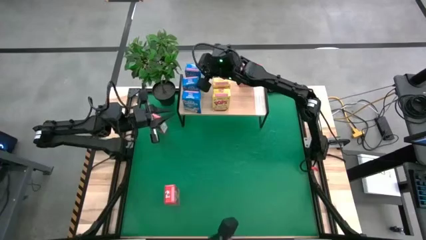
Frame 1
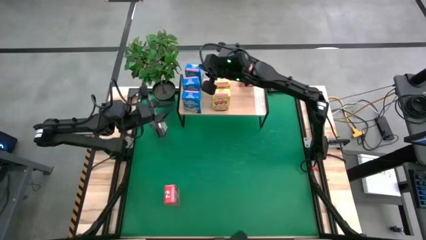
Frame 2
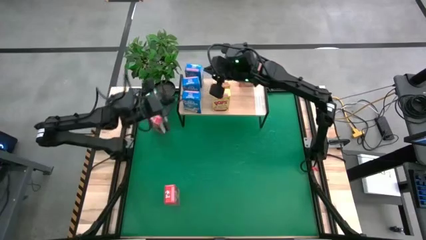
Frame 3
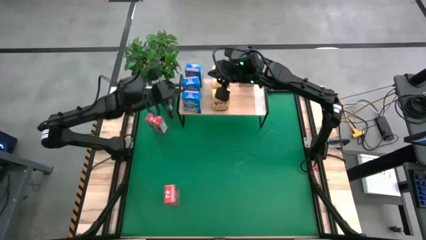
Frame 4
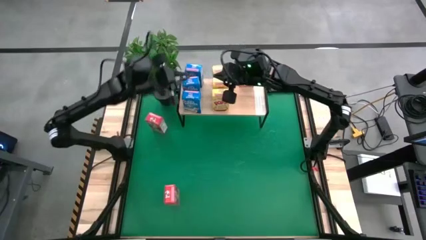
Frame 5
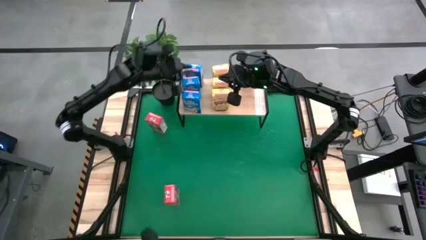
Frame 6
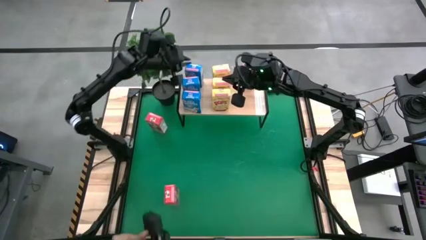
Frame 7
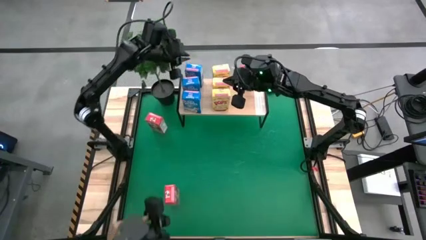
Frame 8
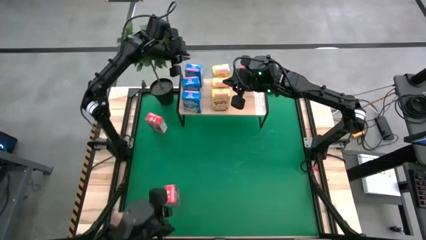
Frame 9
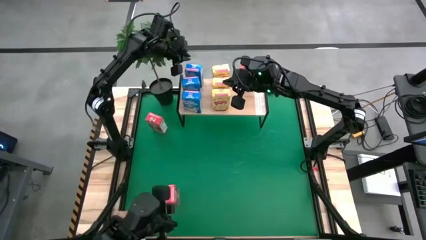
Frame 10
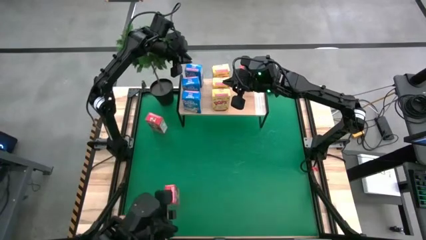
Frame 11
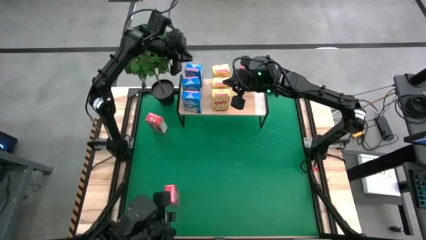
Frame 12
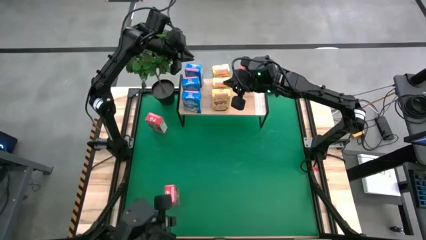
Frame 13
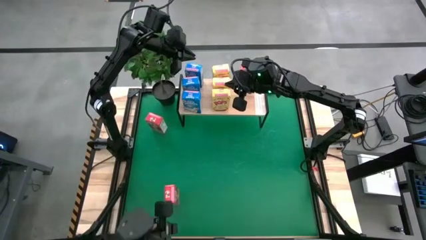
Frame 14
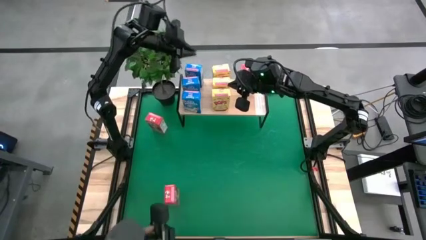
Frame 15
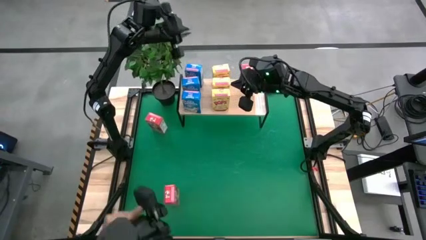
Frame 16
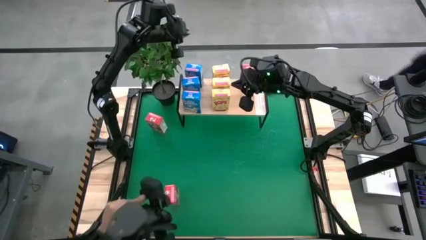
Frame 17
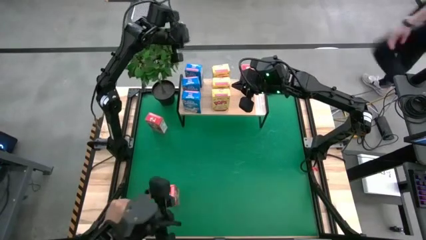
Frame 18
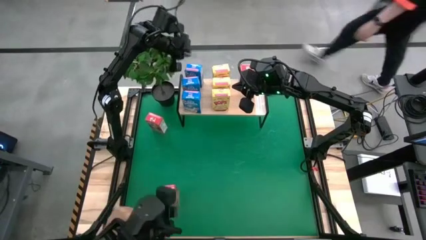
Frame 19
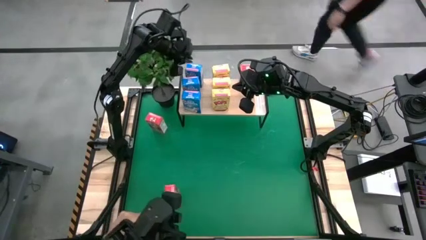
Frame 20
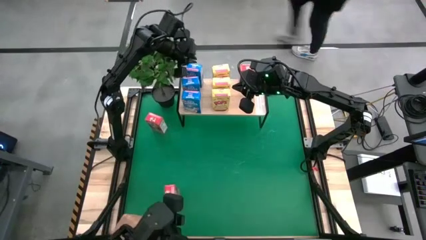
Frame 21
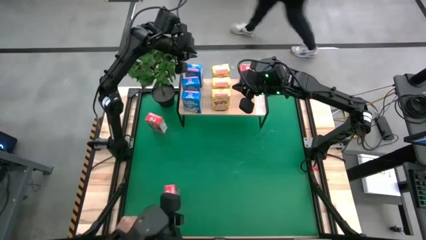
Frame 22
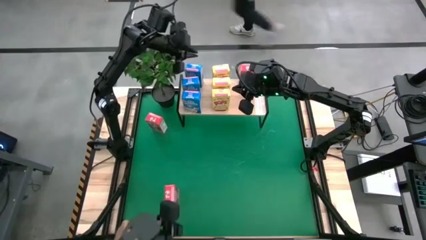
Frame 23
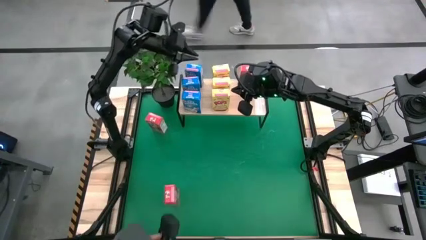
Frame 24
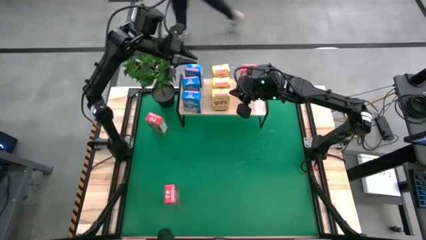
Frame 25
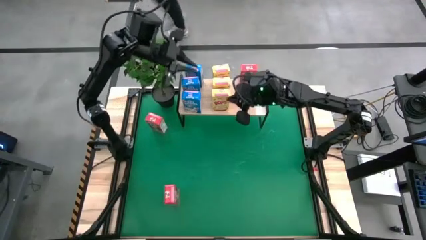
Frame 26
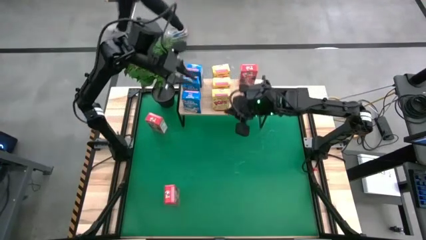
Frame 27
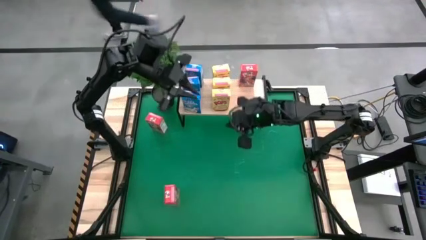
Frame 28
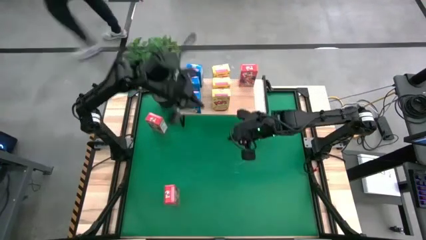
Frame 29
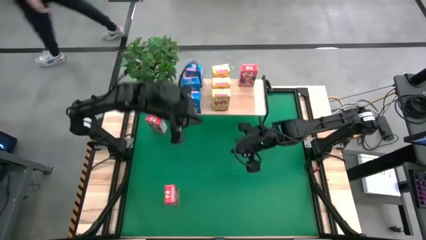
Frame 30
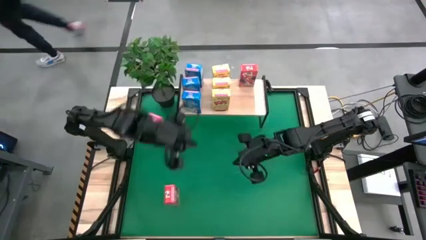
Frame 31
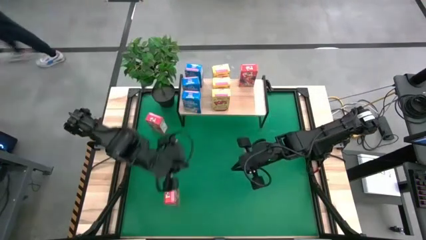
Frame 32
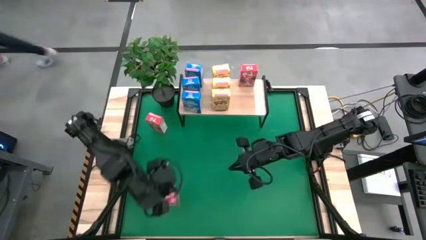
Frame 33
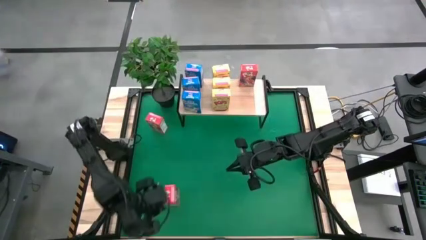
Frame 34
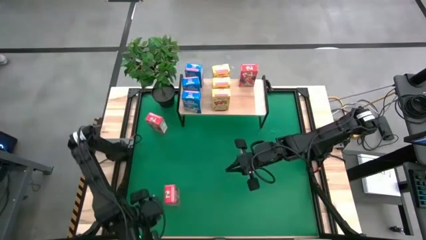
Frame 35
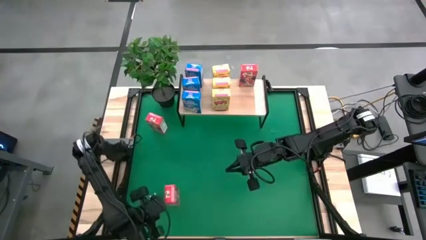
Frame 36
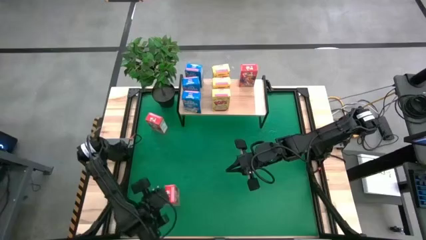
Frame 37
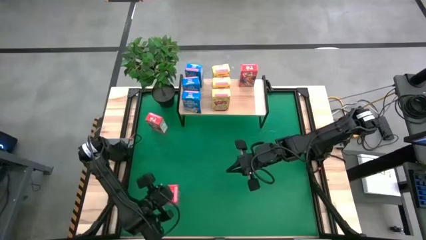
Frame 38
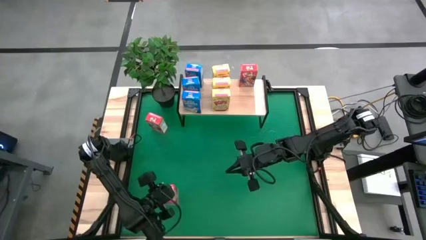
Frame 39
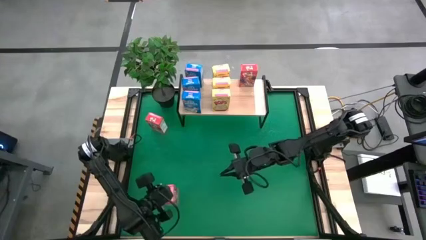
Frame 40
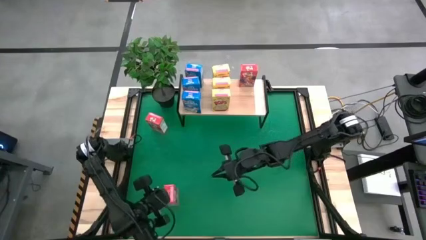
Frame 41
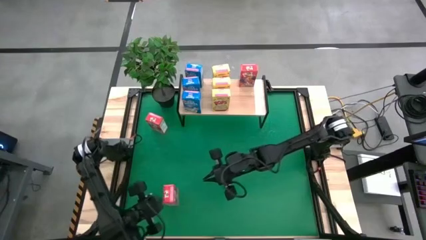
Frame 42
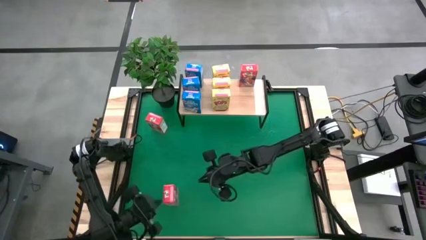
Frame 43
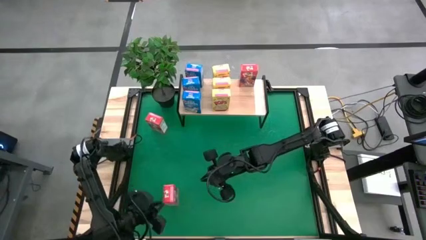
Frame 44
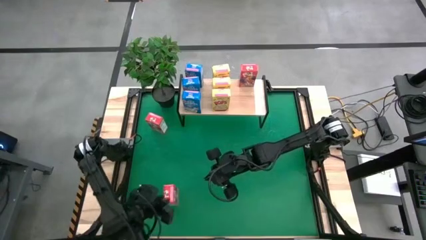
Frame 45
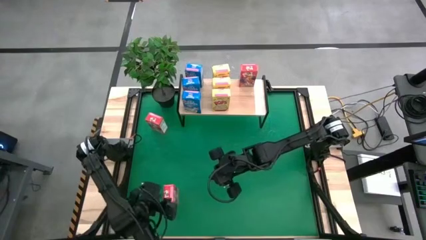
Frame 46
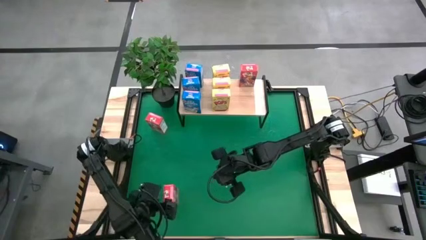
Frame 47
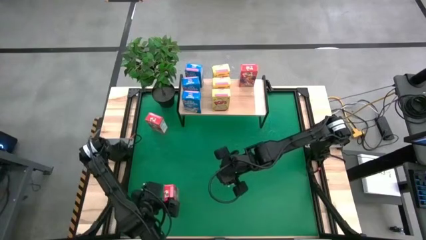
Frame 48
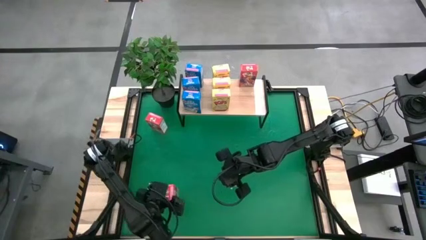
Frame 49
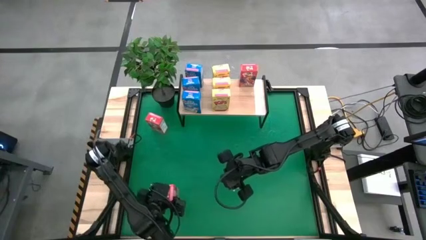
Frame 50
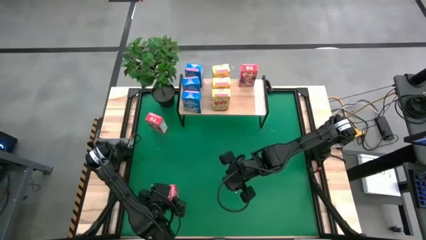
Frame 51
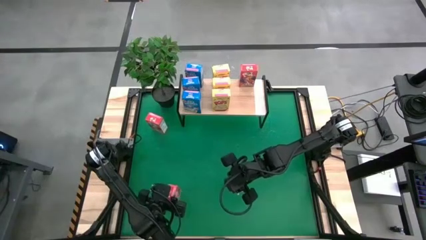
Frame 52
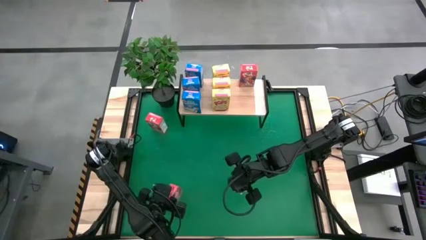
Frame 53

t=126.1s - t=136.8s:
Task: Stack cereal on shelf
Put the bottom red cereal box on the shelf

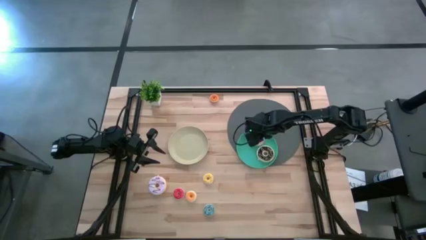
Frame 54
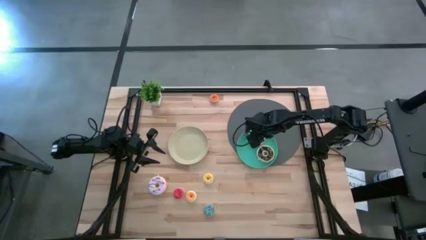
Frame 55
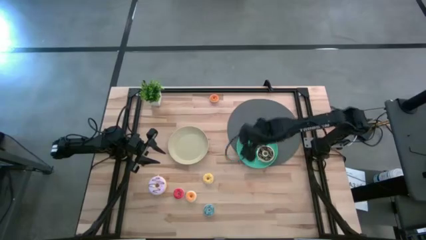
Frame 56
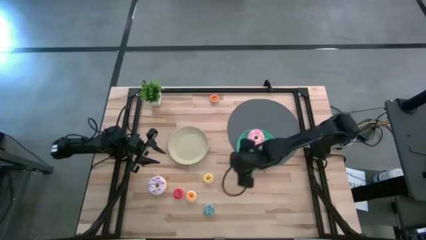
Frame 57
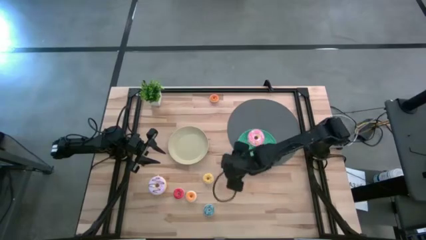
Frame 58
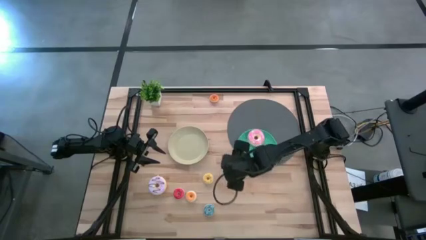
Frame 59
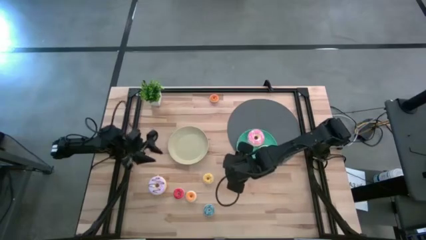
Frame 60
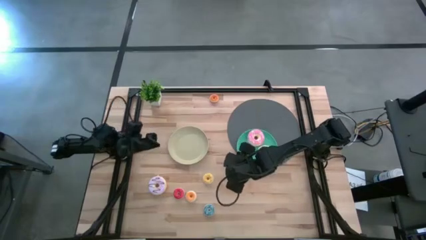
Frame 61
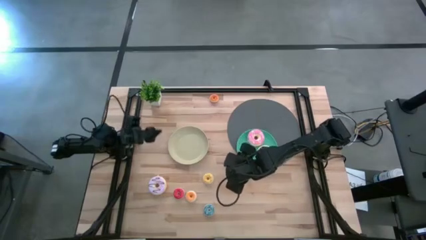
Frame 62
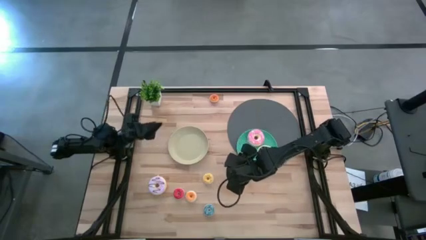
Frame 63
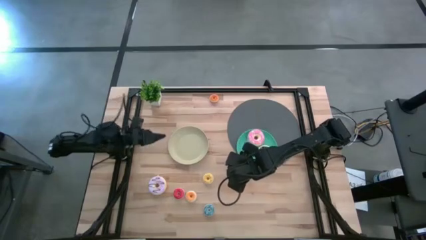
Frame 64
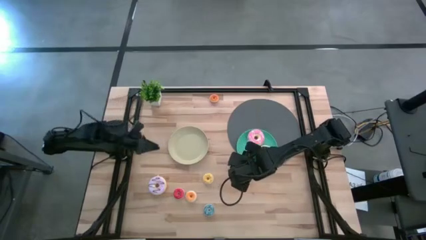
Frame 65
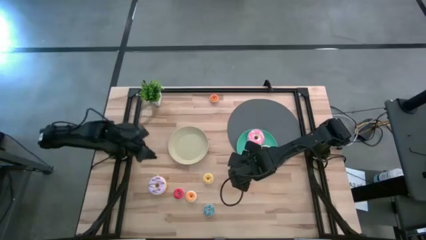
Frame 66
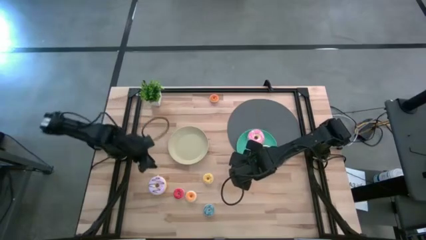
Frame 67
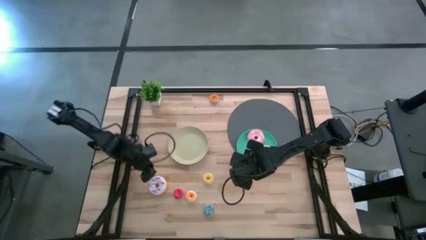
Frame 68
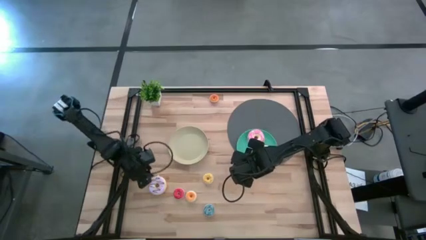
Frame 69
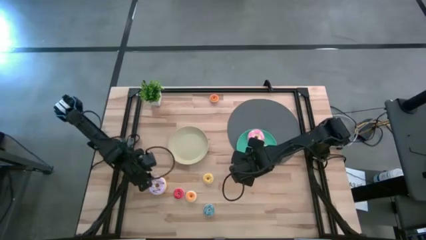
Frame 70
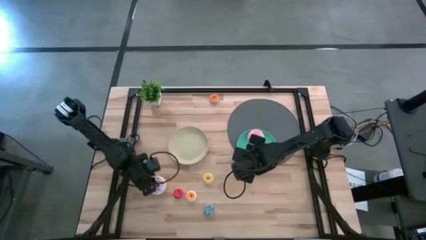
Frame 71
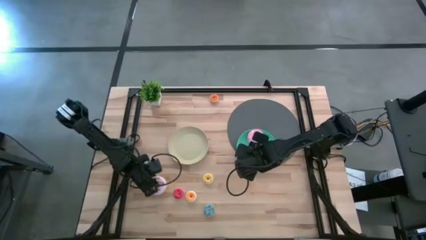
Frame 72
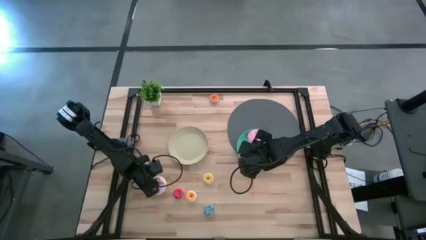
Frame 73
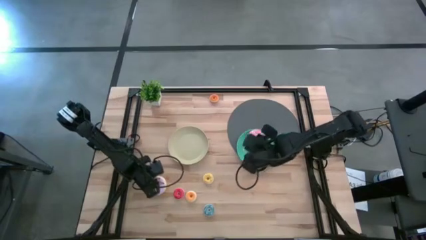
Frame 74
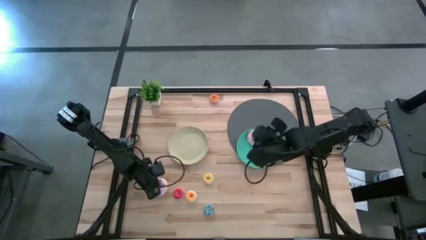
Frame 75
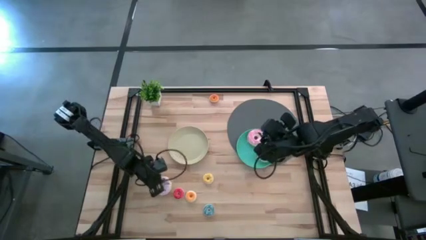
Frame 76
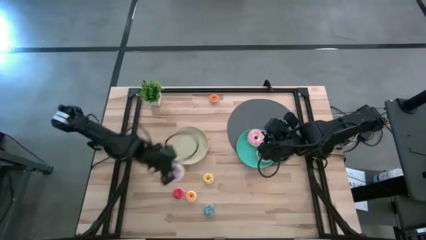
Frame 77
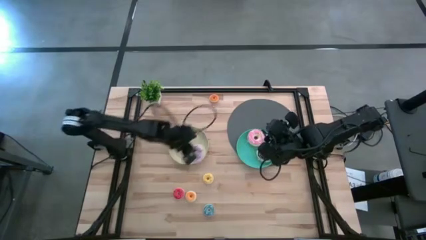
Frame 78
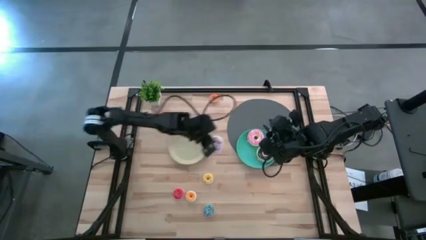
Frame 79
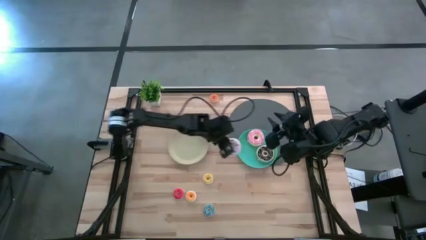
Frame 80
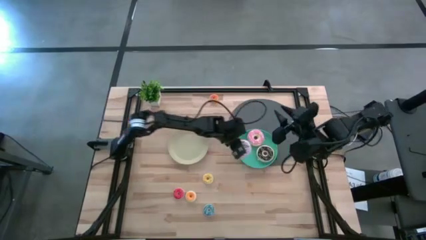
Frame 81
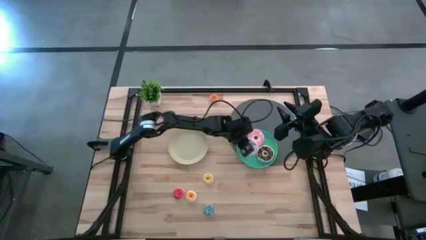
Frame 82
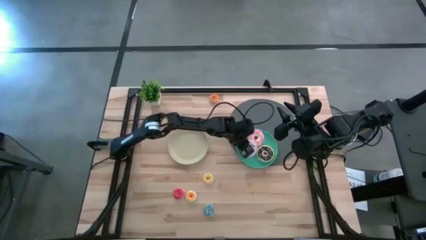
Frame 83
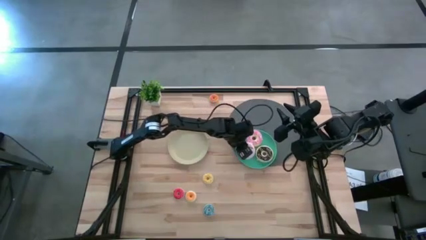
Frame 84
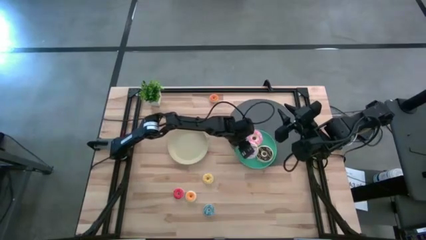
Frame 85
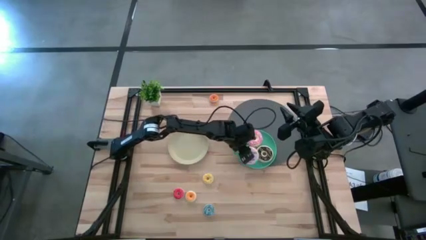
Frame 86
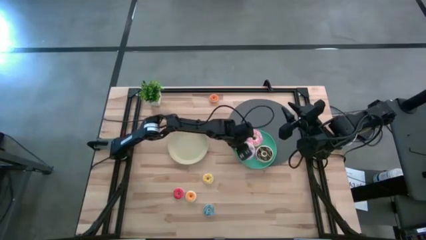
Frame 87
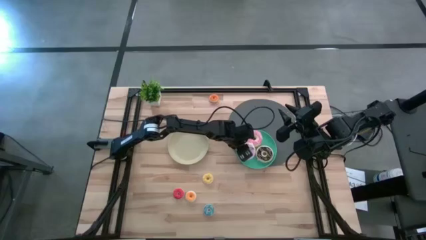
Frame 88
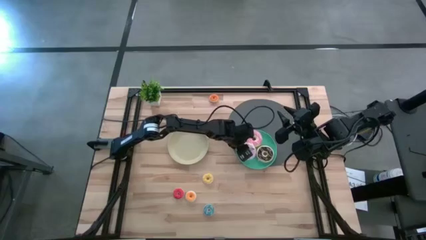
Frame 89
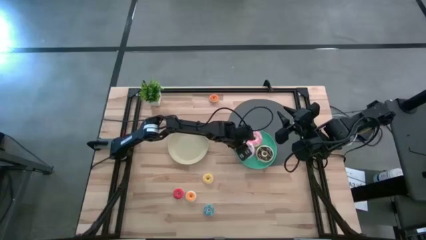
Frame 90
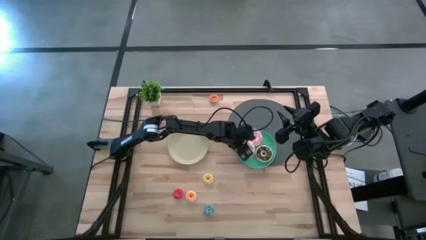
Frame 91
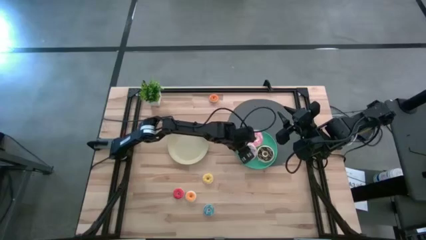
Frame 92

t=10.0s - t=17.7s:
Task: Pick & Place donuts
Put the large purple donut on the blue plate
